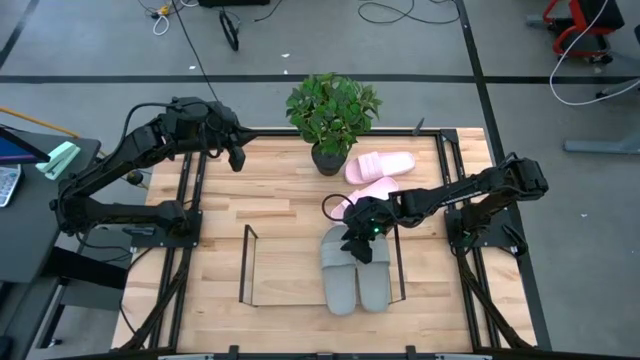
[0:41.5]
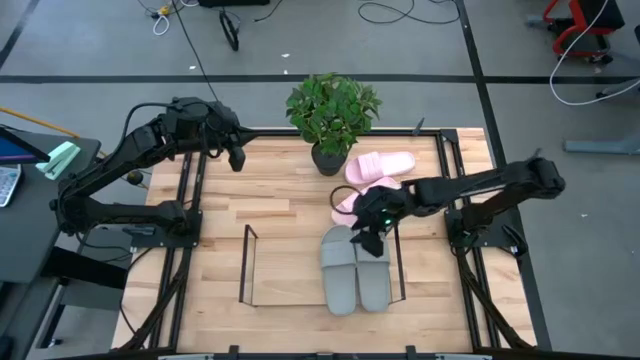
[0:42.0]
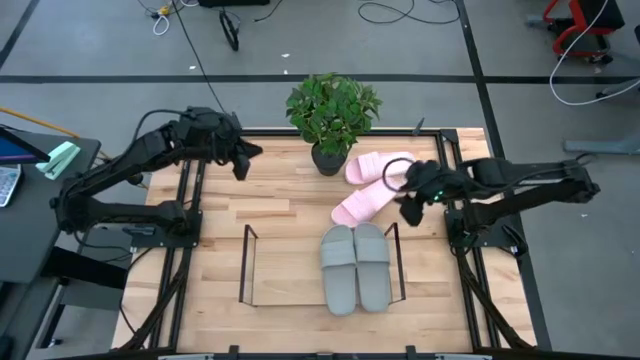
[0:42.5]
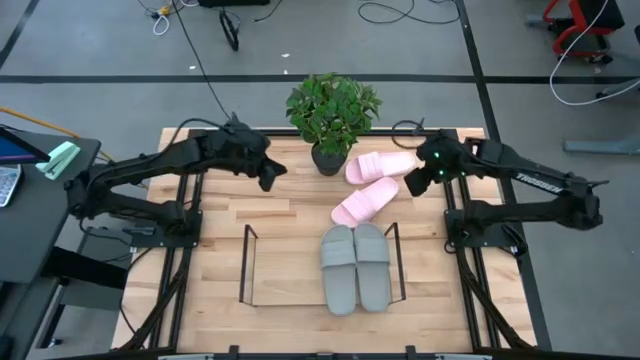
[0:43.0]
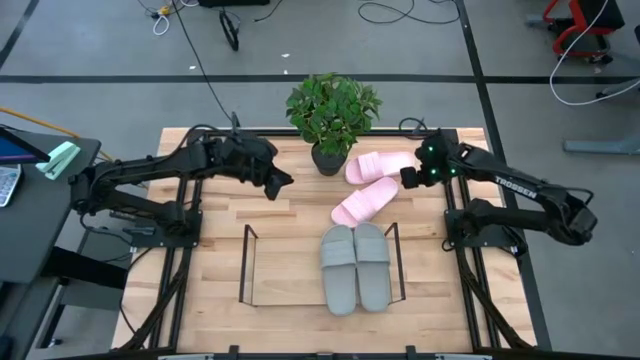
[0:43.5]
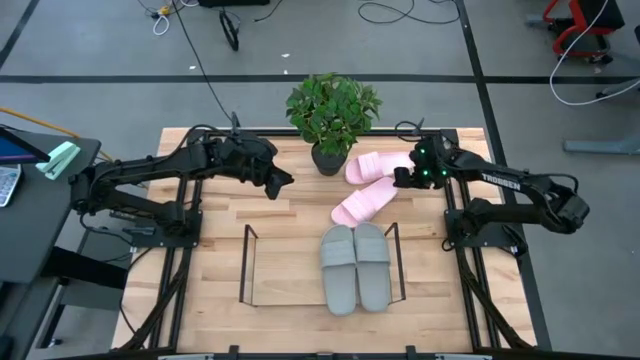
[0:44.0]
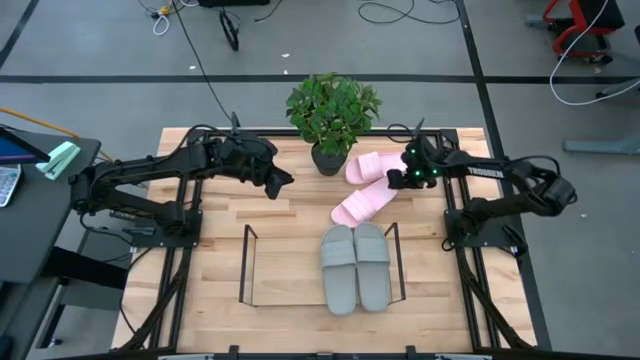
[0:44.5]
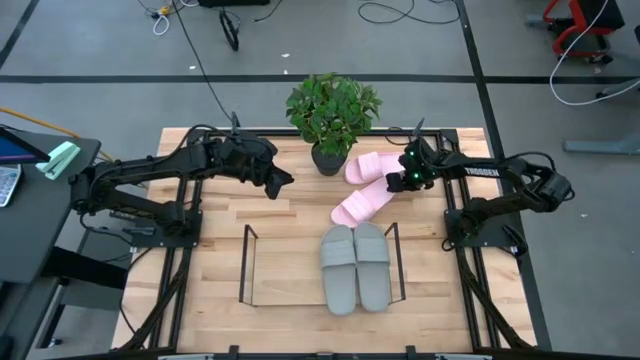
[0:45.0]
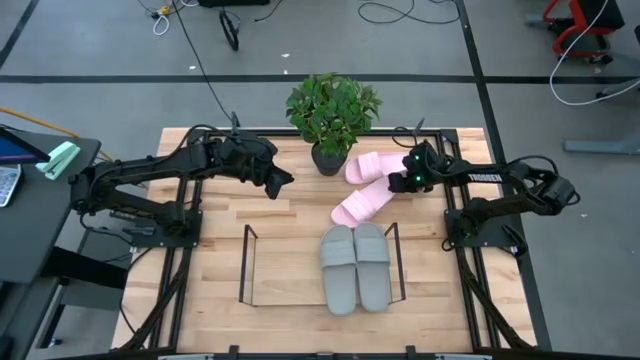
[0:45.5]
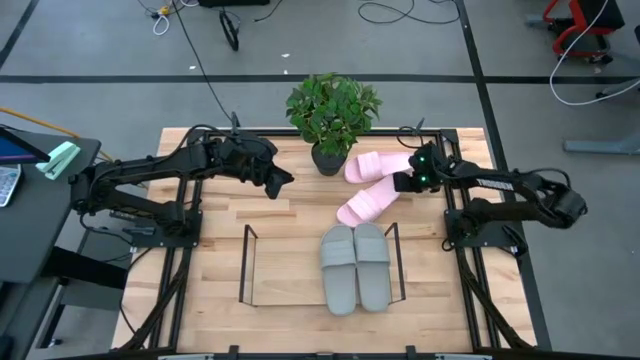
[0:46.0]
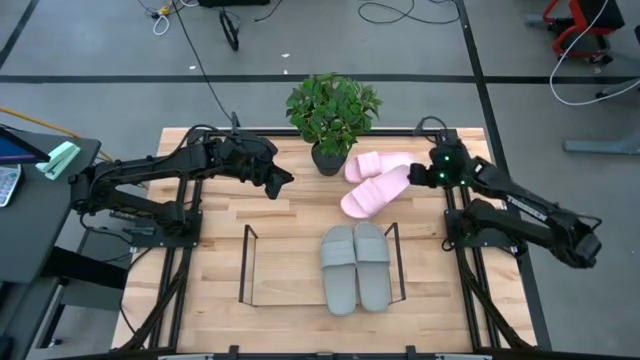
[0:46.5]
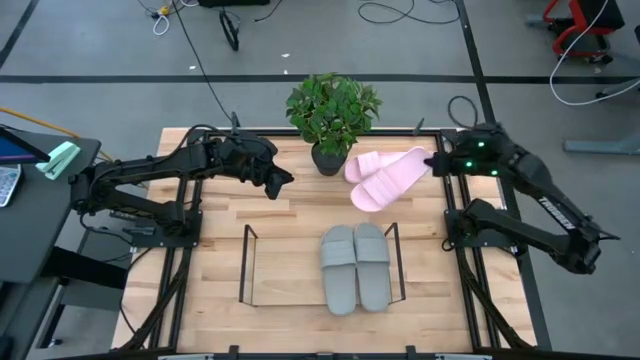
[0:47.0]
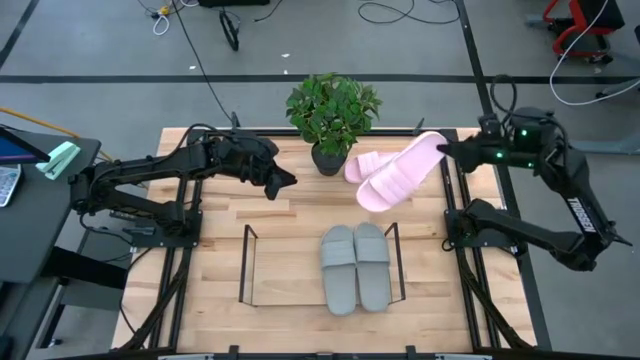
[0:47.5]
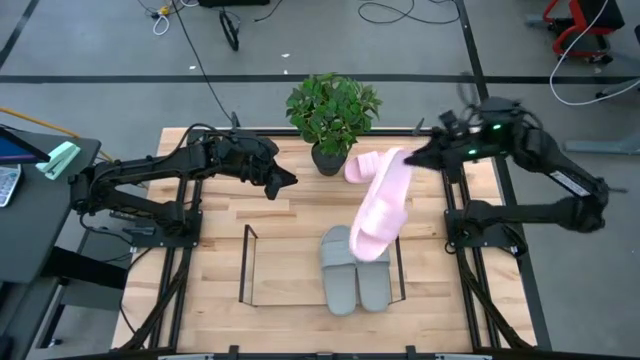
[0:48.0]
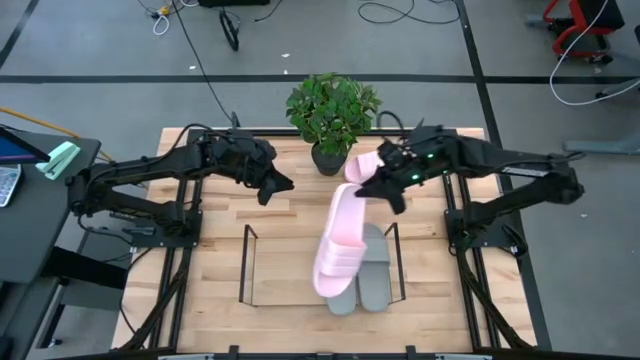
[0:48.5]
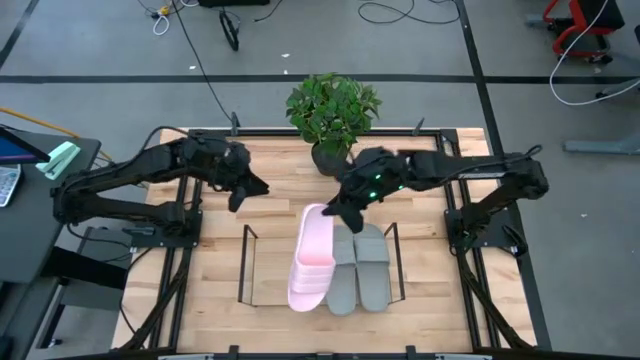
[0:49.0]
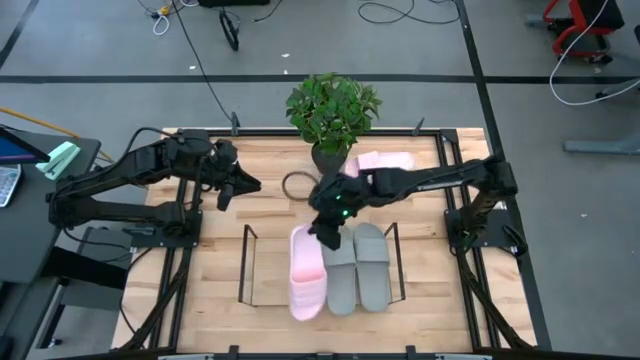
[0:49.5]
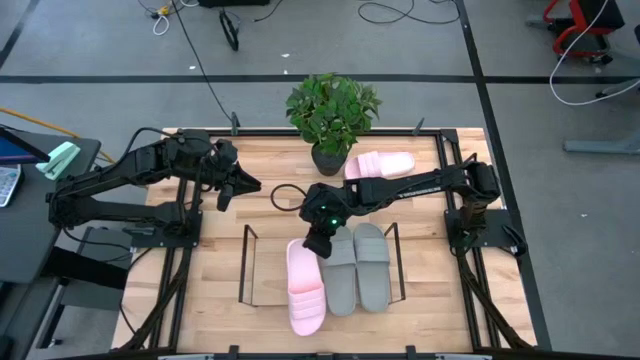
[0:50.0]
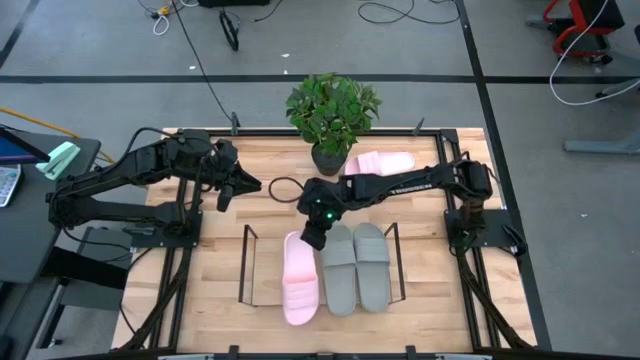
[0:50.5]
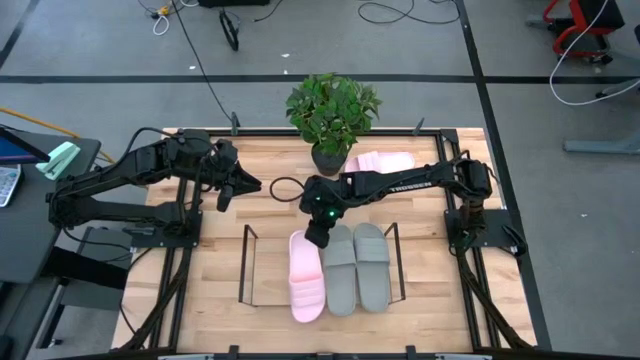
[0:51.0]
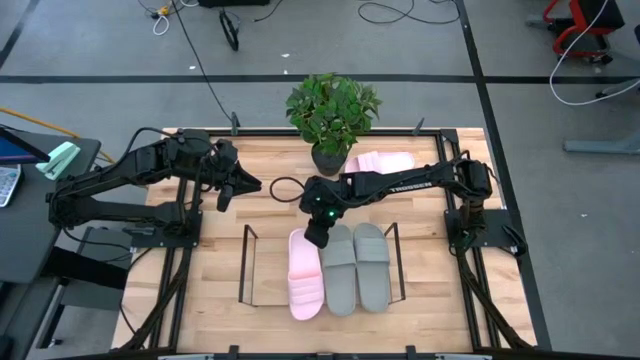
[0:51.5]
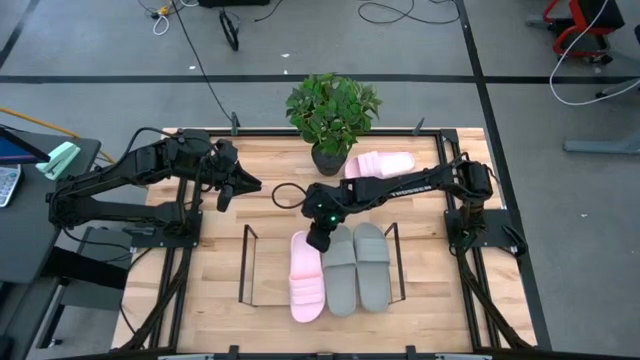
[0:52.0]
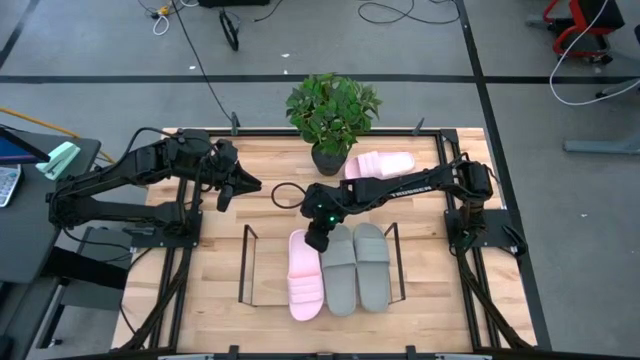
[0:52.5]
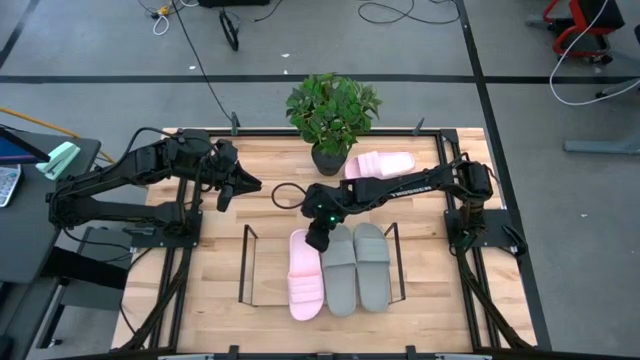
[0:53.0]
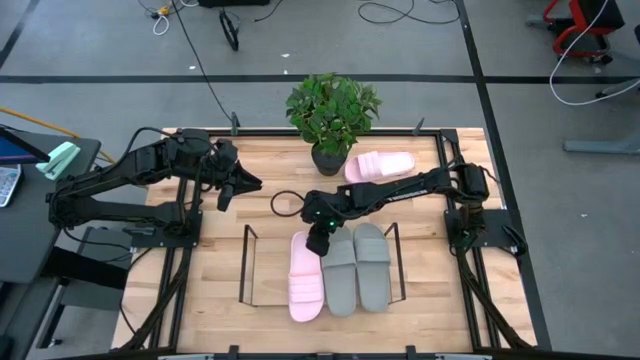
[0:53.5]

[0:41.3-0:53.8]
Task: Pick and place slides into the shelf
Put the bottom pink slide on the shelf

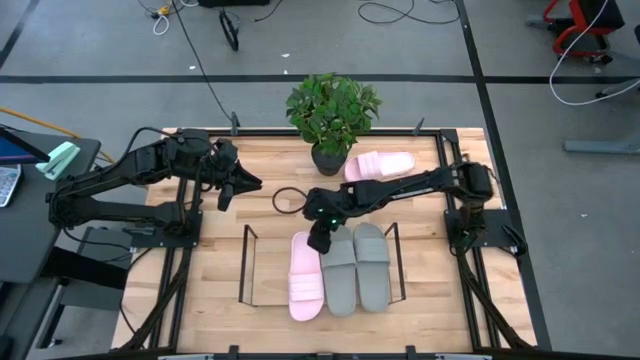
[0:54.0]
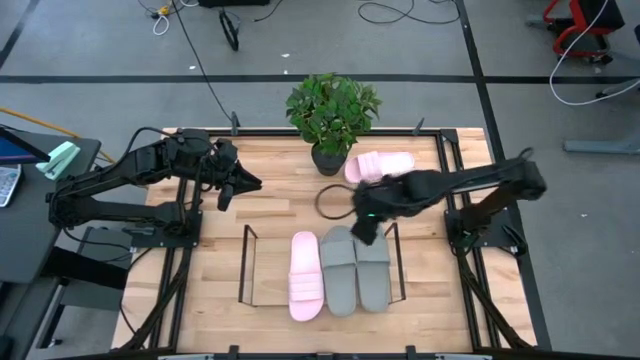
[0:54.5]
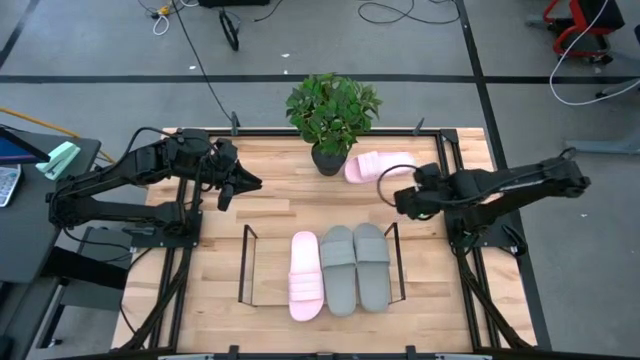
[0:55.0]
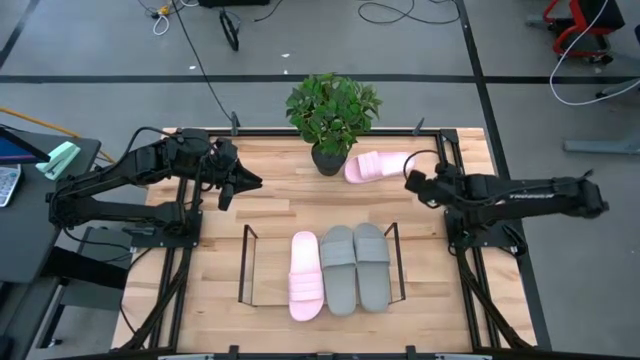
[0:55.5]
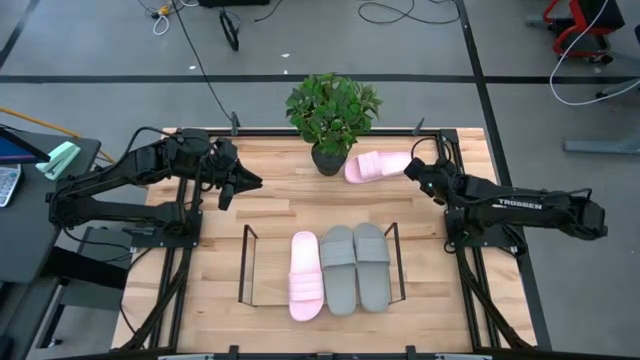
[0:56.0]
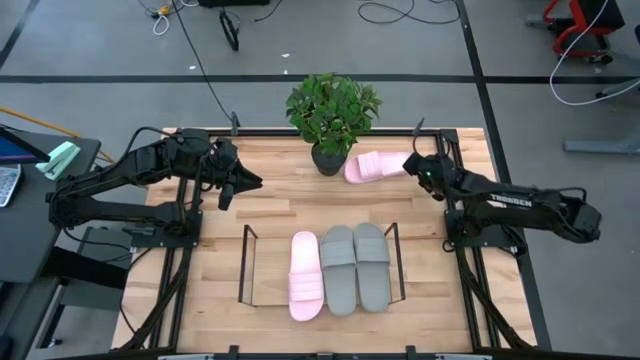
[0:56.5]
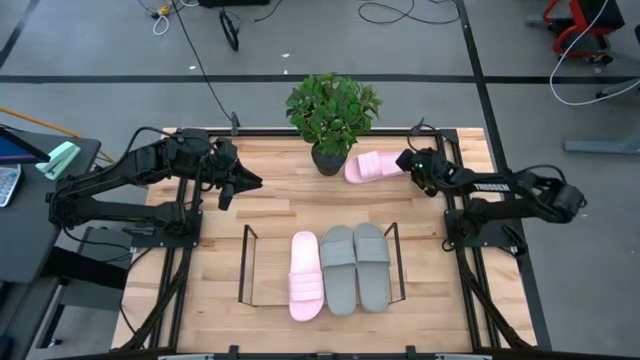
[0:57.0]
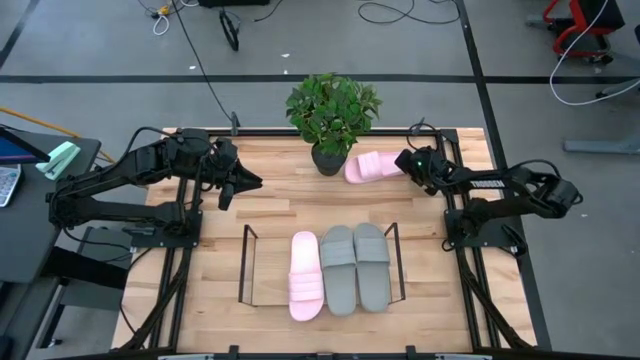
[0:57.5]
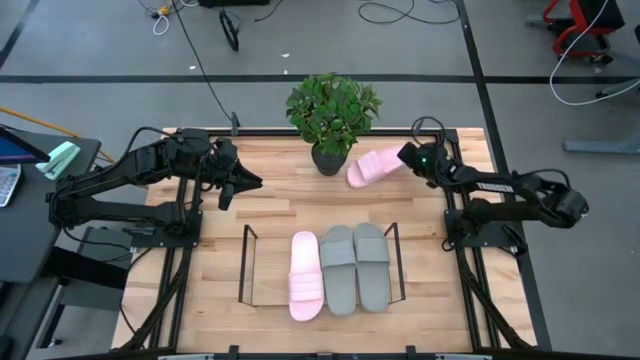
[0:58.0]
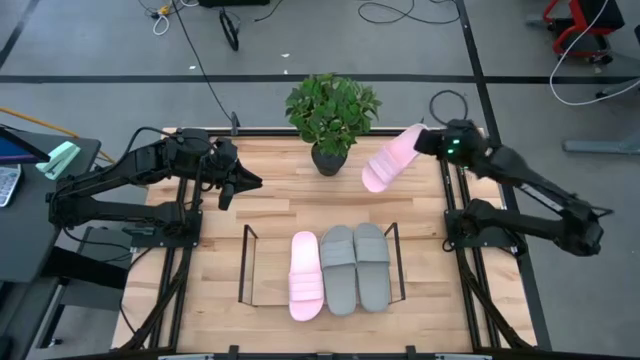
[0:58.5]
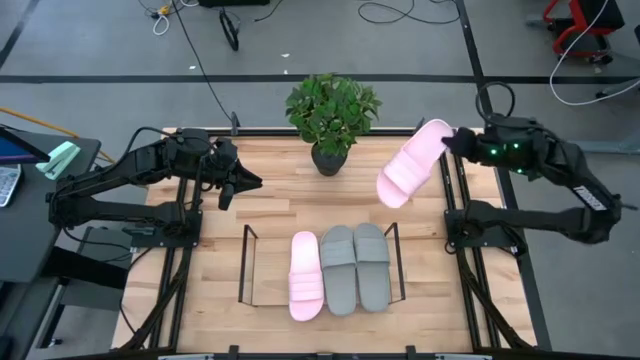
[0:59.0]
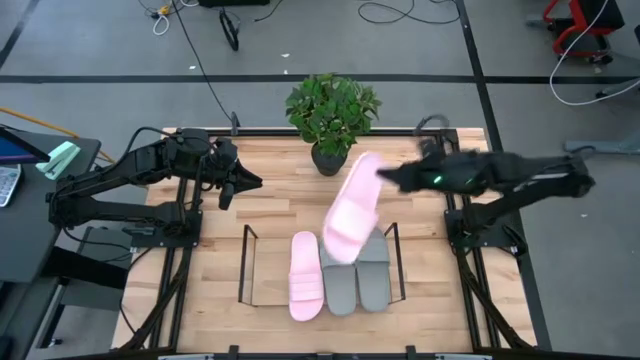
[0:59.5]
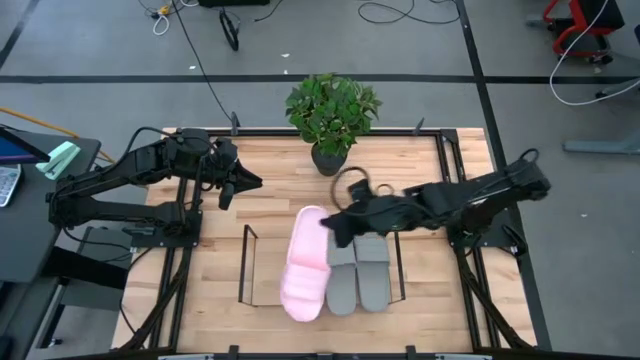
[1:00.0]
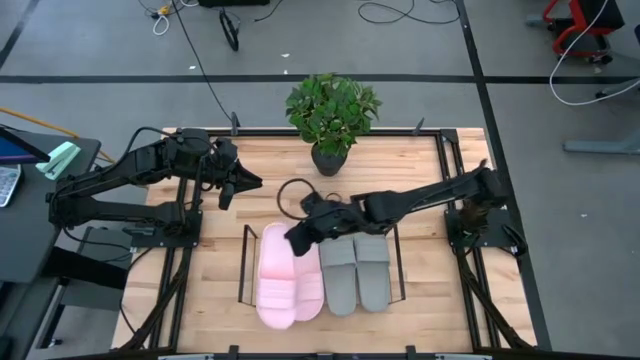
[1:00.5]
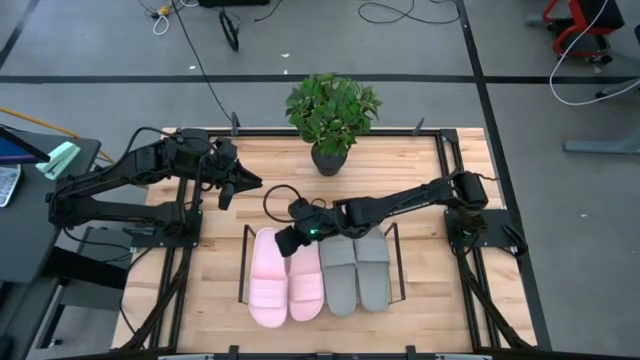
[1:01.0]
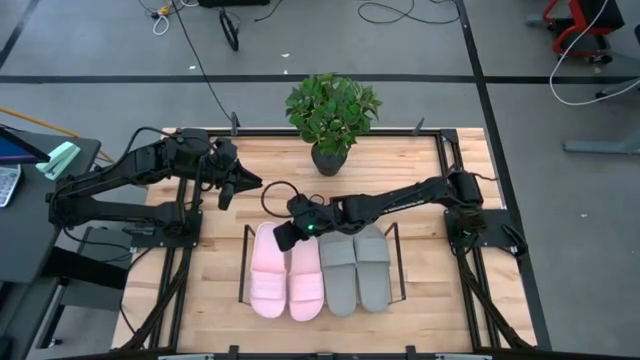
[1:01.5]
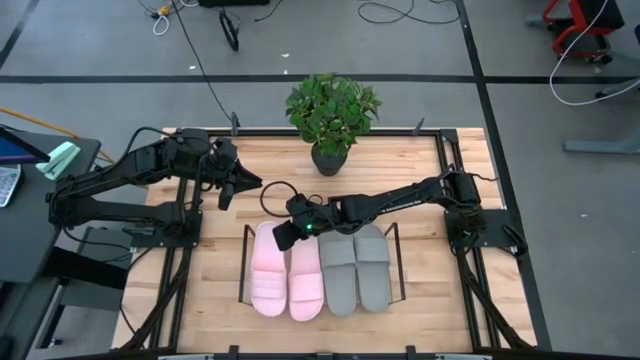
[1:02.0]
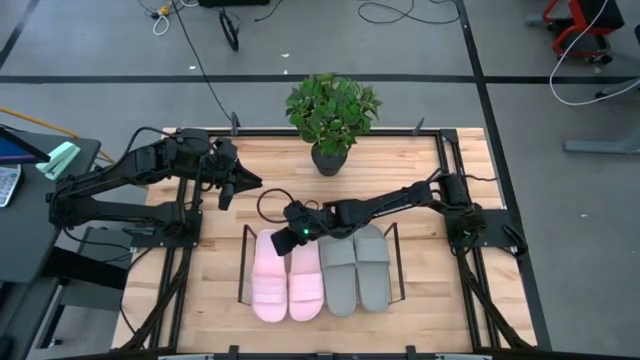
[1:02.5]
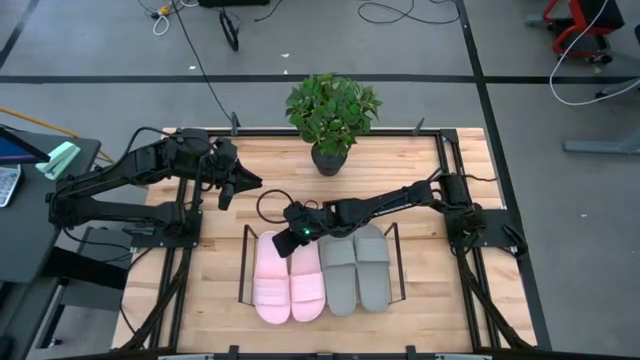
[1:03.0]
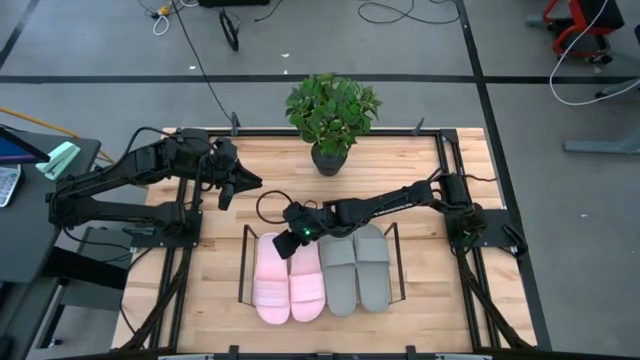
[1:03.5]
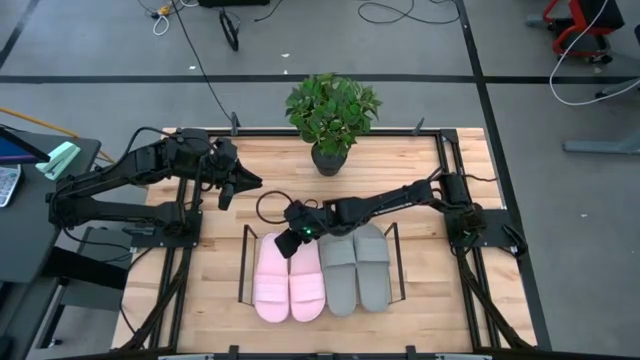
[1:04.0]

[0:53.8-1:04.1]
Put the pink slide on the shelf
